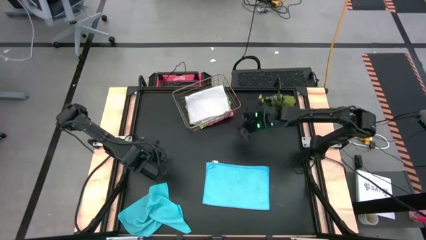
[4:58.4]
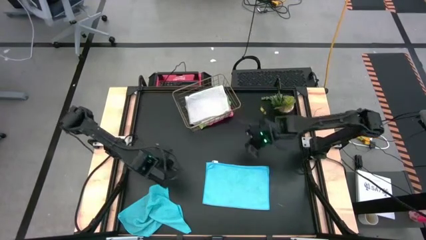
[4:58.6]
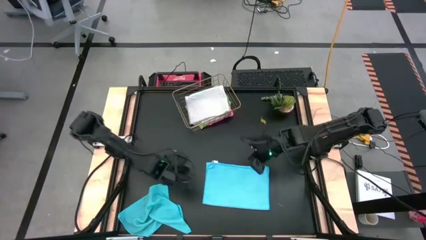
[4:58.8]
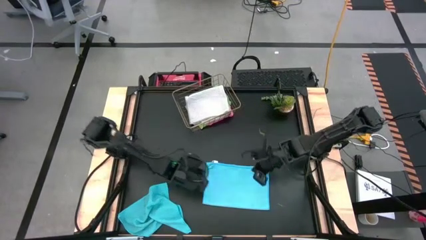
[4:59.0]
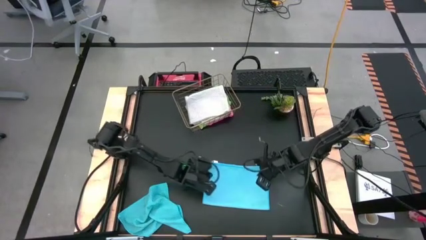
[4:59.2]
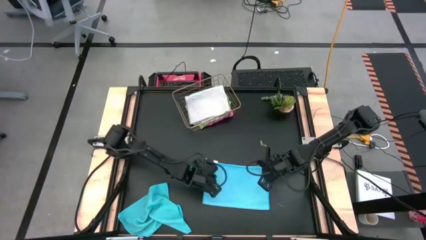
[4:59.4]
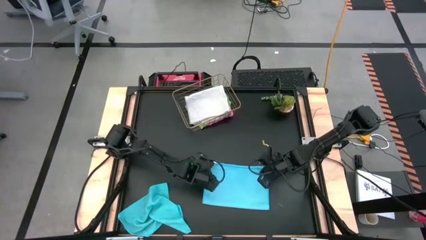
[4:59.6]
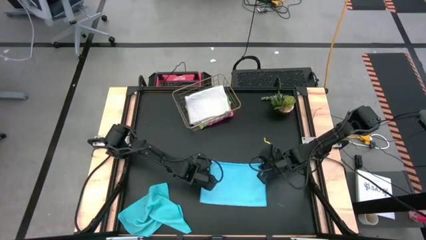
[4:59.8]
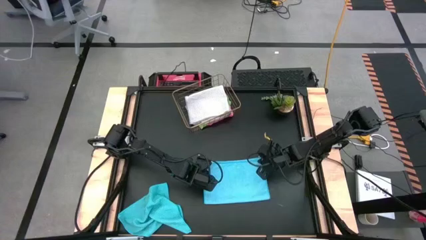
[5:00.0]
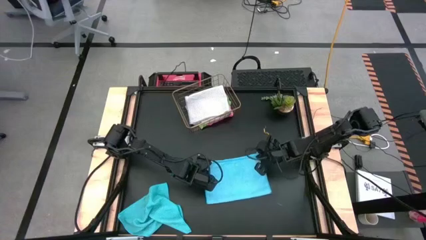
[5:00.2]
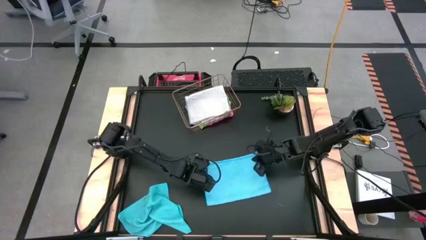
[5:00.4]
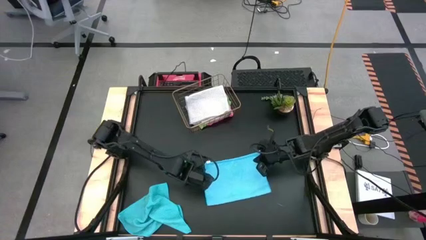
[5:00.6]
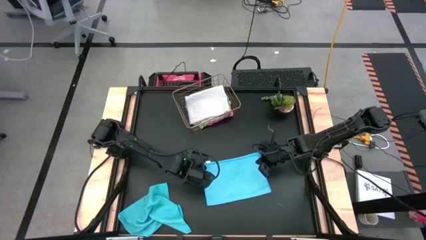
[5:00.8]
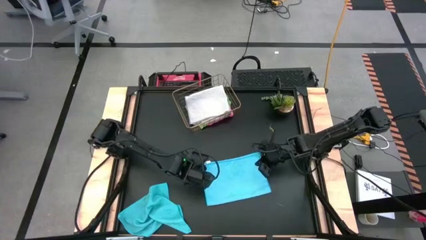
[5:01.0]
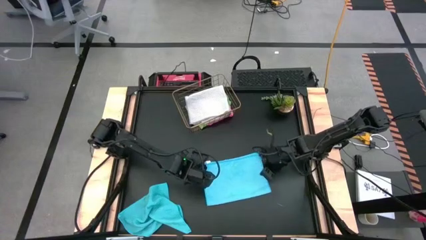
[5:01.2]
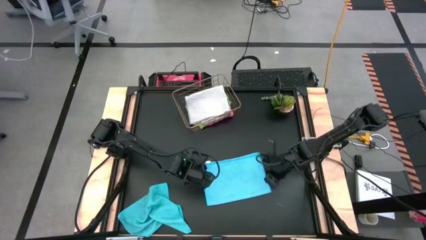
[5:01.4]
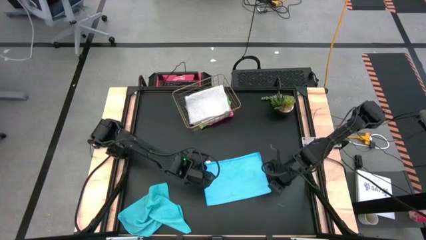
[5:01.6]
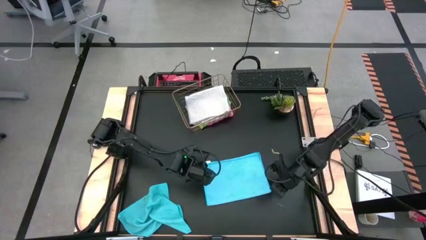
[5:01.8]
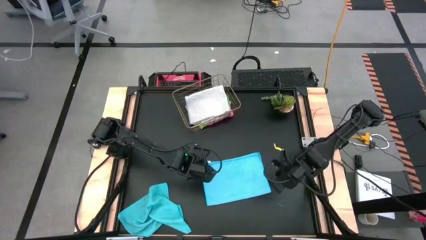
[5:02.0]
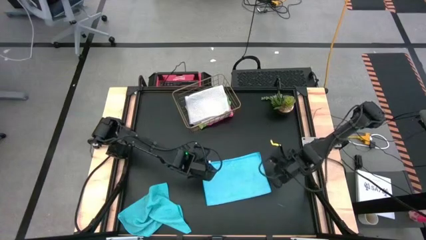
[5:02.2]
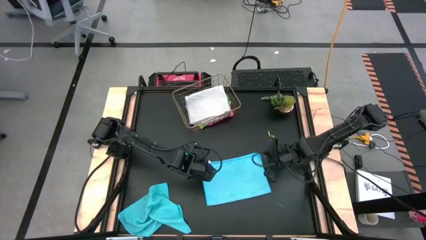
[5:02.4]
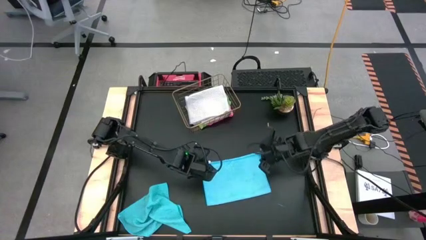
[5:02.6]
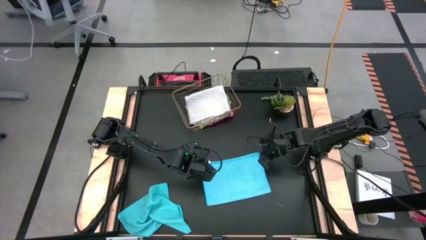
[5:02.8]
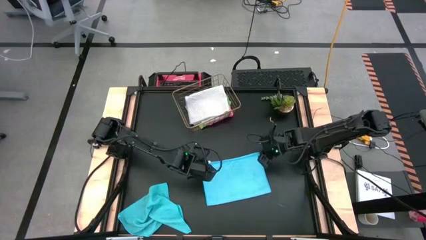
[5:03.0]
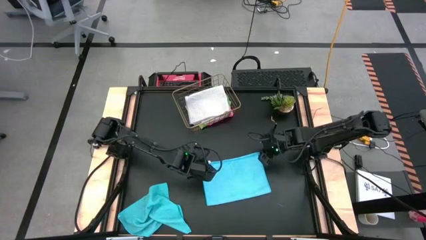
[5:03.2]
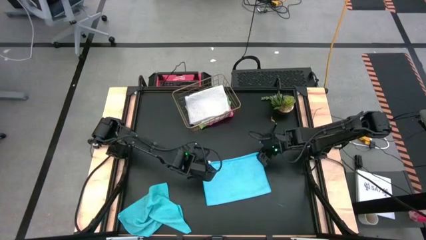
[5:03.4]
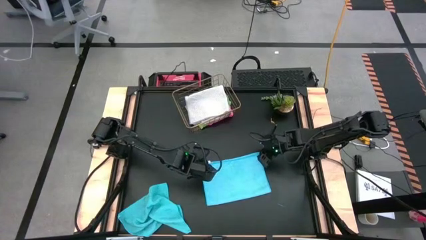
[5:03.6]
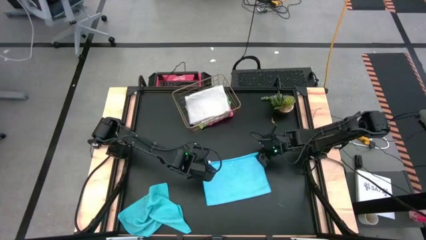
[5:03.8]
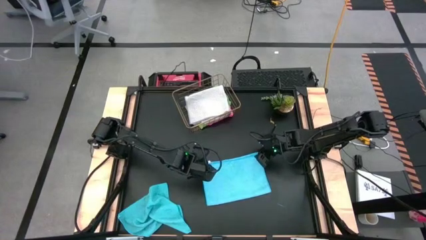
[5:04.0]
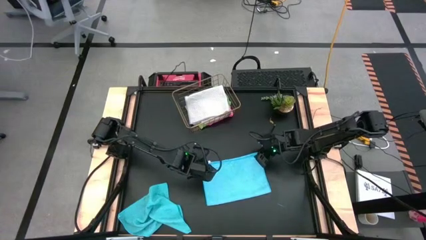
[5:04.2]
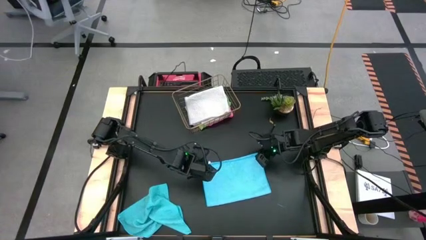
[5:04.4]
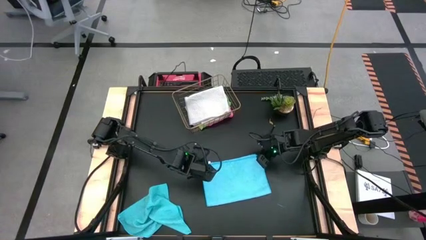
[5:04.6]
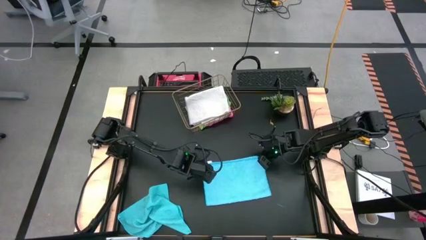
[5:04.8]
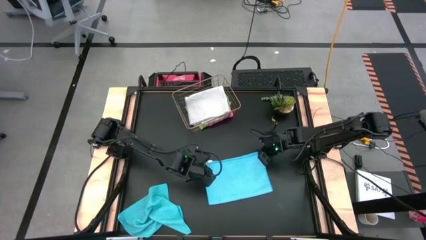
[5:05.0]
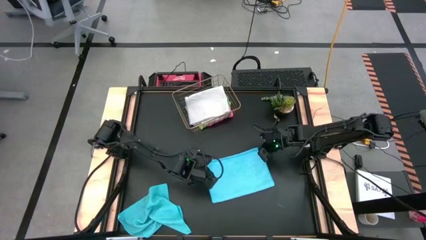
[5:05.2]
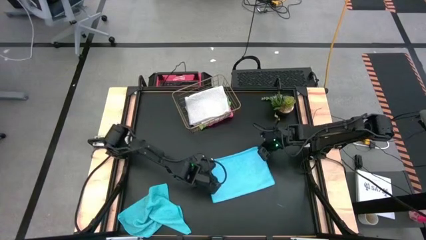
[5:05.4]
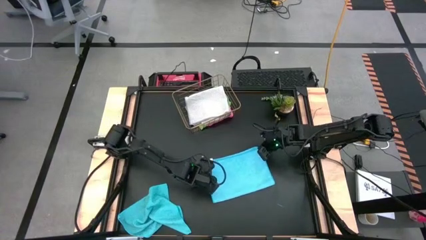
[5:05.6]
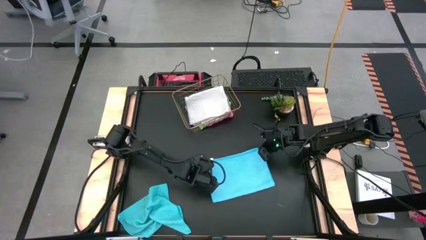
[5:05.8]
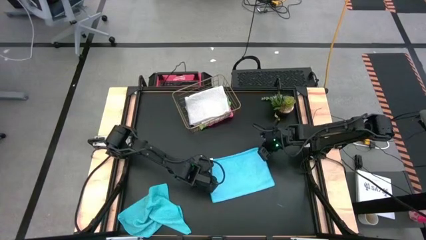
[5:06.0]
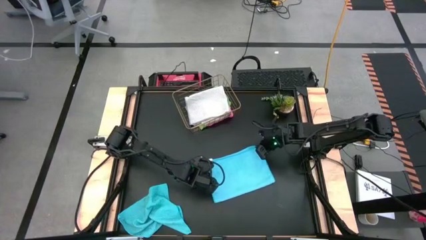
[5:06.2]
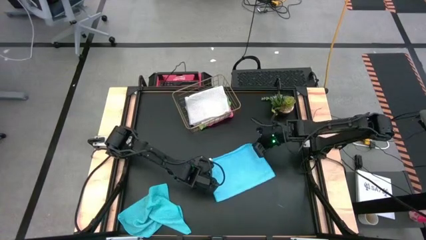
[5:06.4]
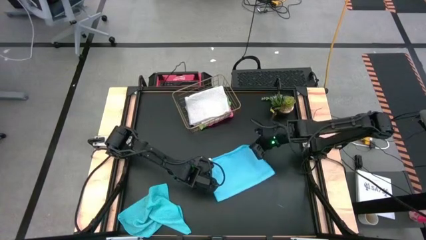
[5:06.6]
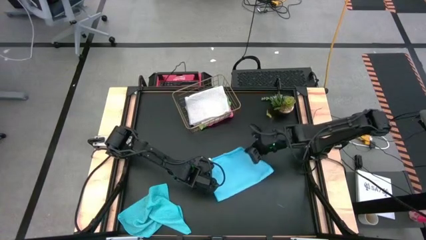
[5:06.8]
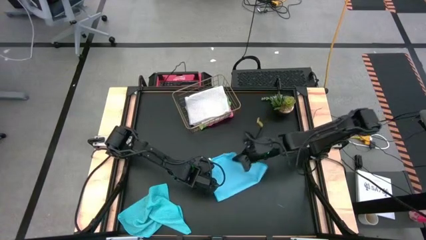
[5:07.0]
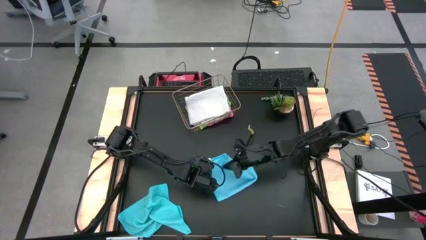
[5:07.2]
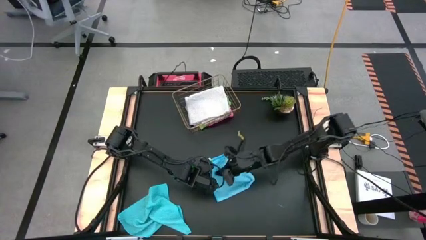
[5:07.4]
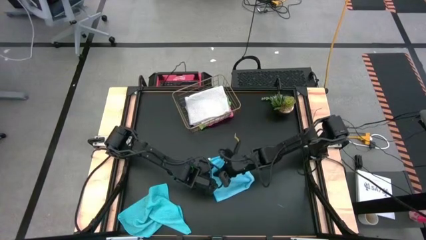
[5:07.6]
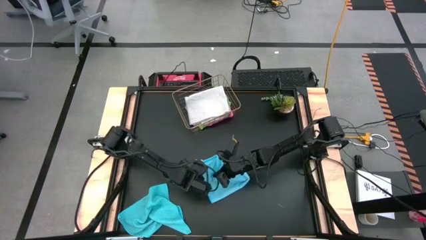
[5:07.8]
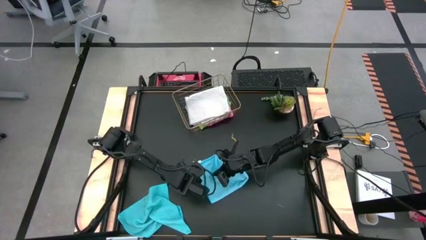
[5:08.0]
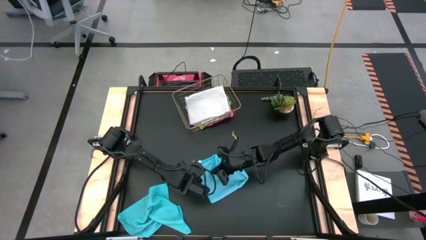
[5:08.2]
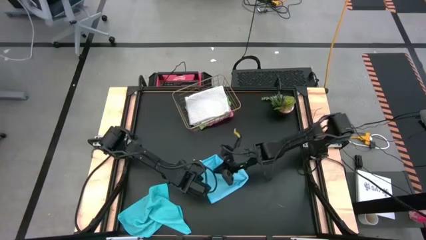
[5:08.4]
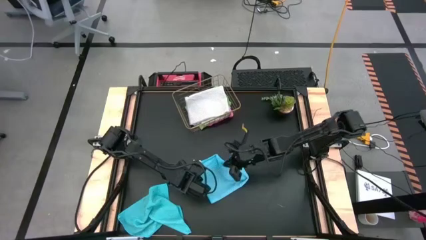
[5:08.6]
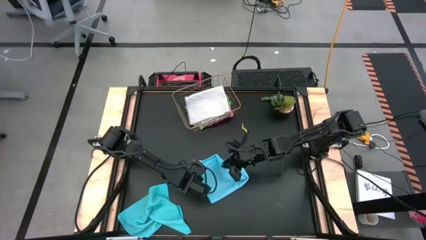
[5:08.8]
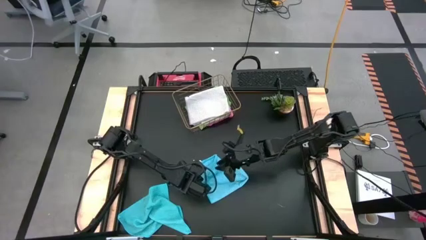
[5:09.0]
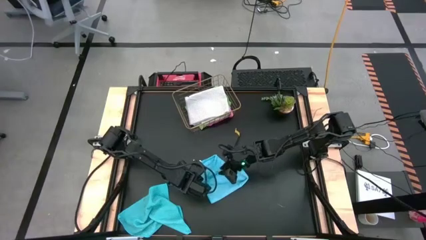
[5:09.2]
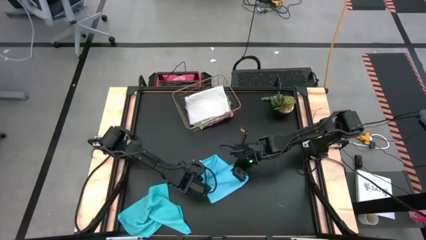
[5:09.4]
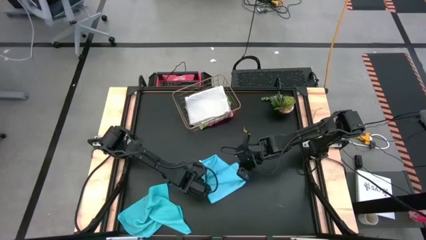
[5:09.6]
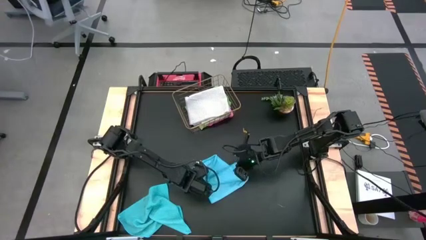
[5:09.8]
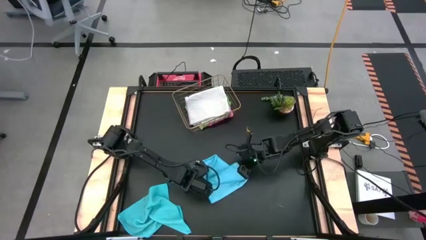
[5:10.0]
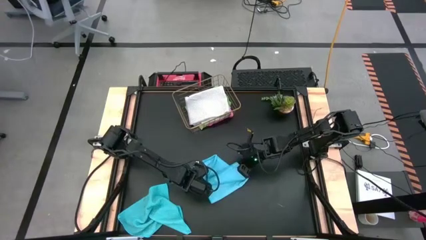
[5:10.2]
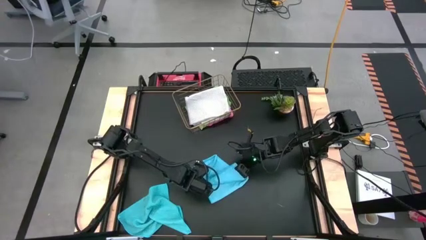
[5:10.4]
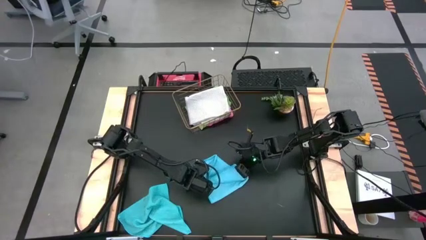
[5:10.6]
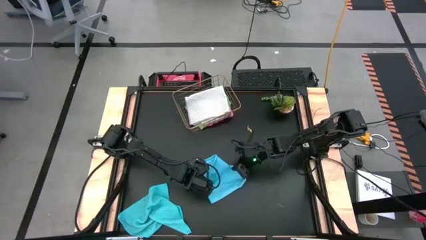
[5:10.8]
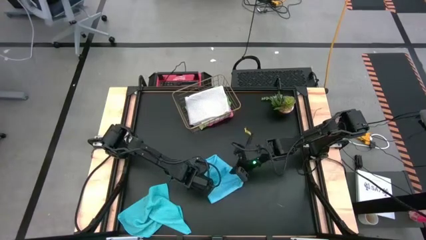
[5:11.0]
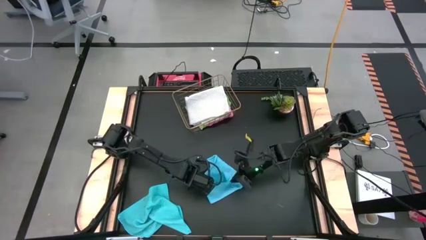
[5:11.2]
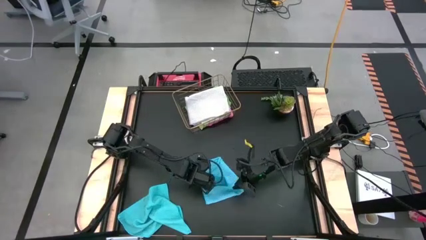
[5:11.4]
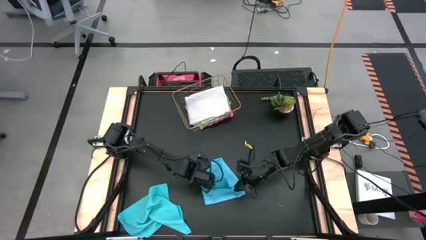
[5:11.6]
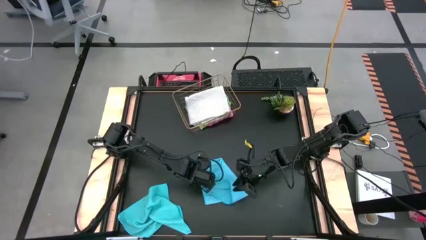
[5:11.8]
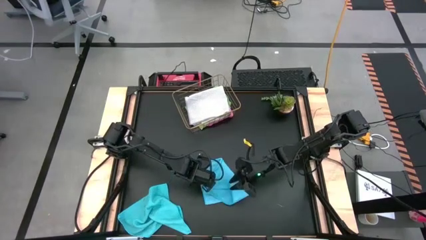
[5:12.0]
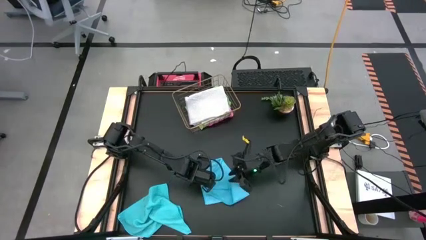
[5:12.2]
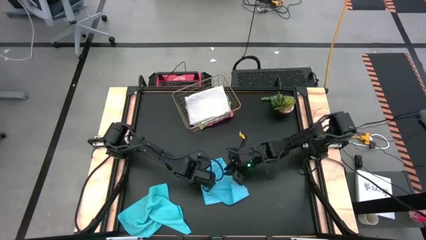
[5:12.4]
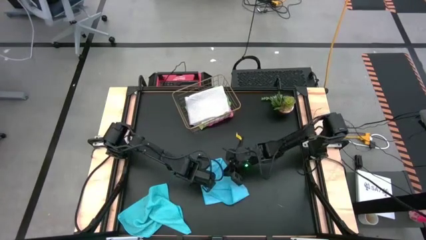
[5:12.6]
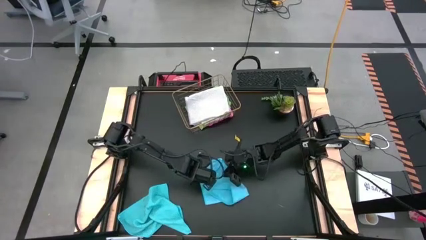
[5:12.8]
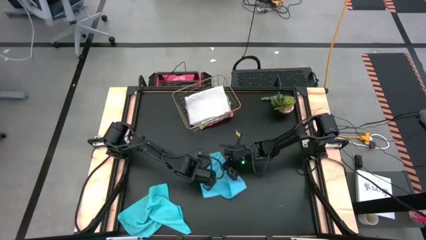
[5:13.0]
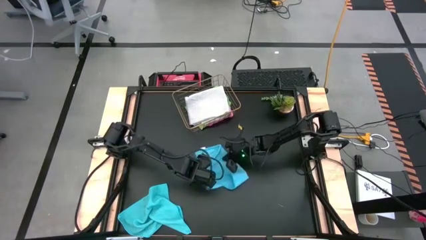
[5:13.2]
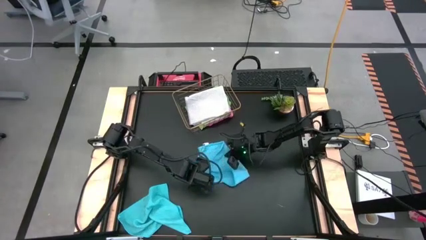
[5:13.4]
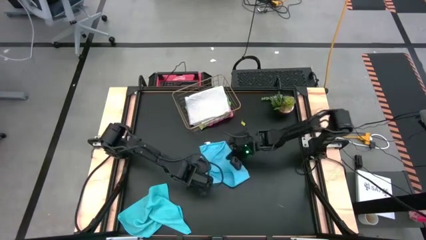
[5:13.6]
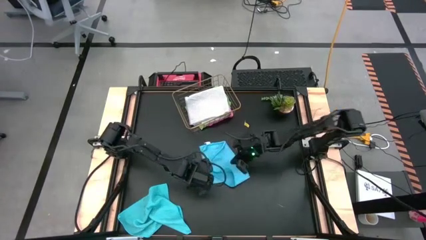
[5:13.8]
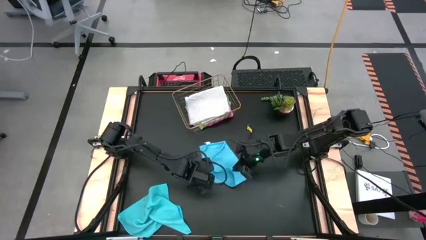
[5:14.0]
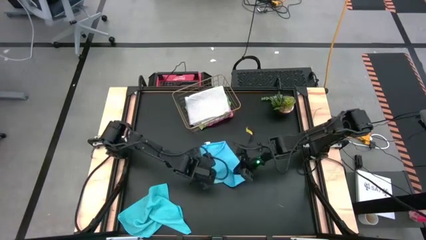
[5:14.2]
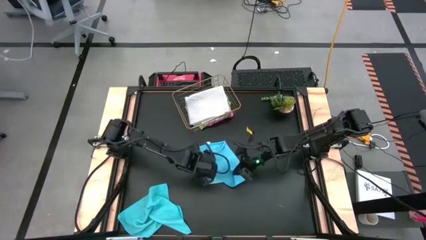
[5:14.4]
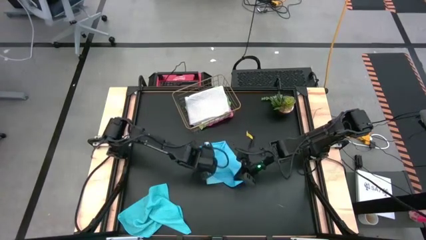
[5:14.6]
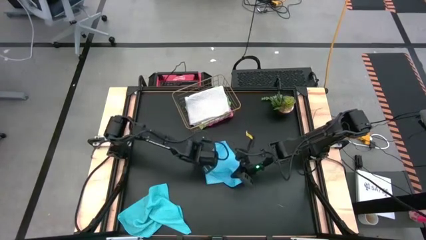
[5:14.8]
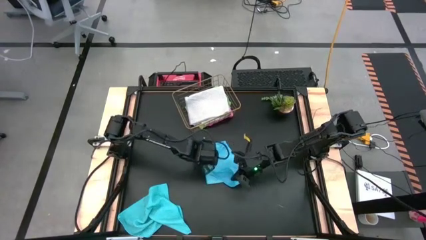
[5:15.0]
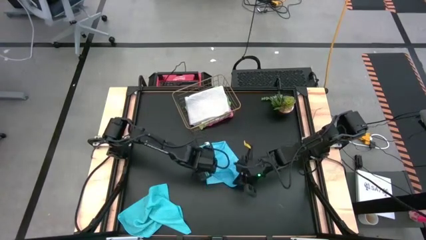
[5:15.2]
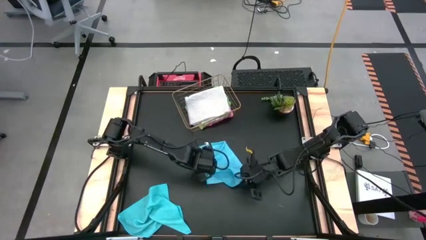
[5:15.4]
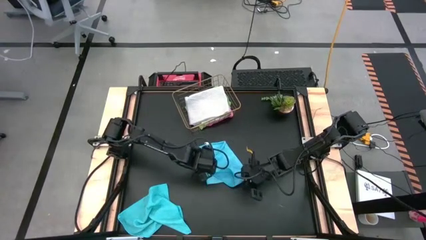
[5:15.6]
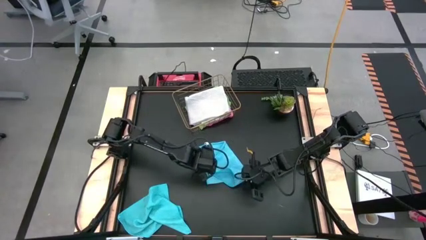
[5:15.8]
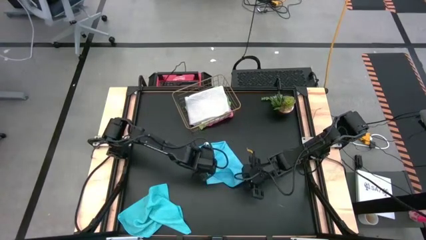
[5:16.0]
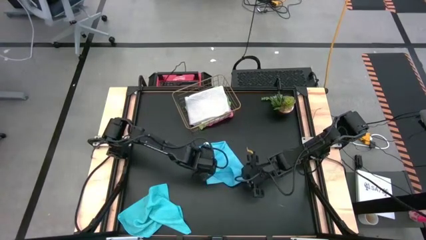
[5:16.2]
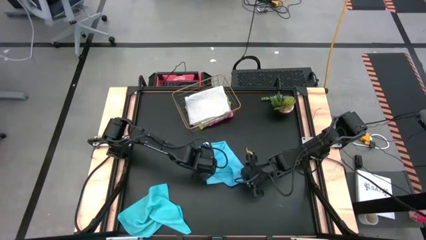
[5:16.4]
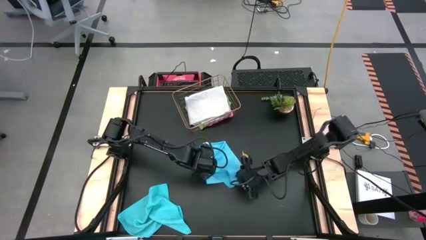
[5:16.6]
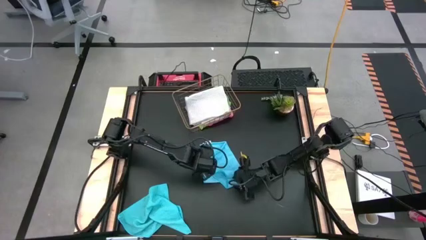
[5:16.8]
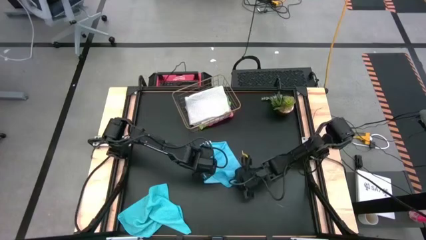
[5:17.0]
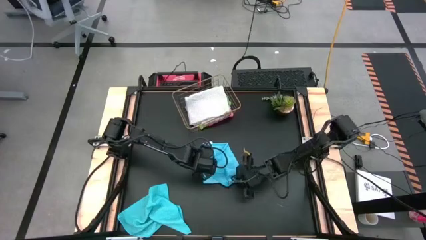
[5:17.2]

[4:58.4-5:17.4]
Task: Fold microfiber towels
Fold the right light blue microfiber cloth
